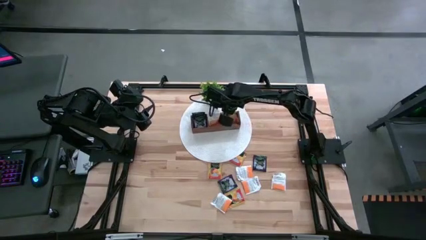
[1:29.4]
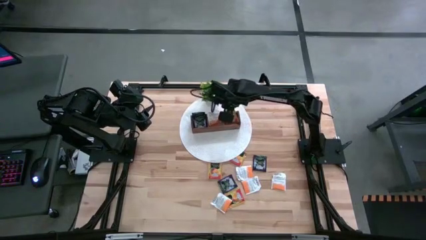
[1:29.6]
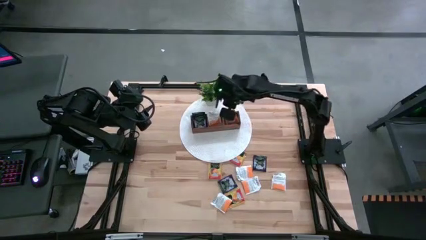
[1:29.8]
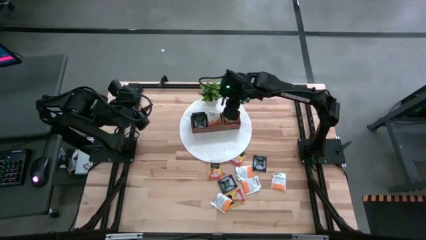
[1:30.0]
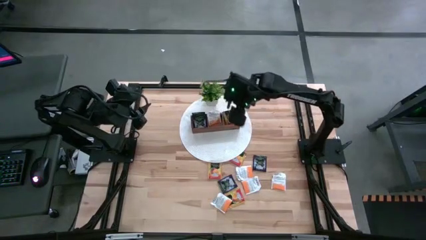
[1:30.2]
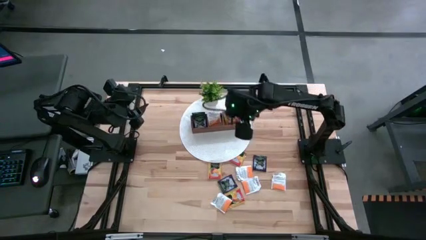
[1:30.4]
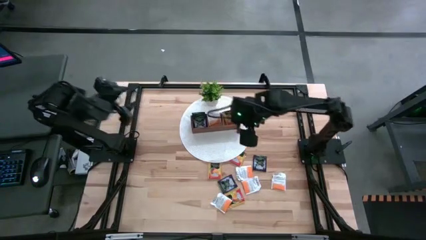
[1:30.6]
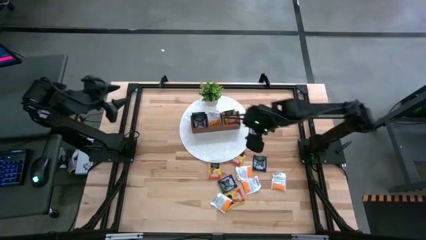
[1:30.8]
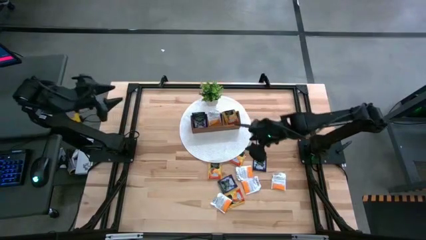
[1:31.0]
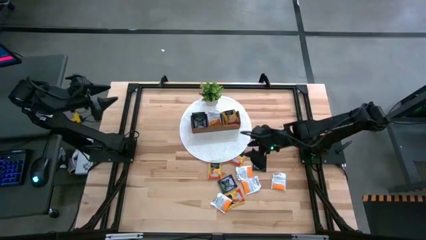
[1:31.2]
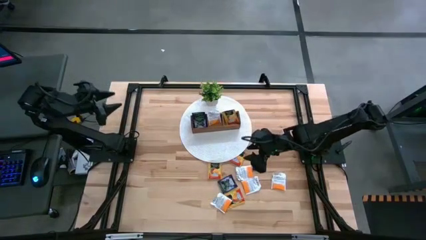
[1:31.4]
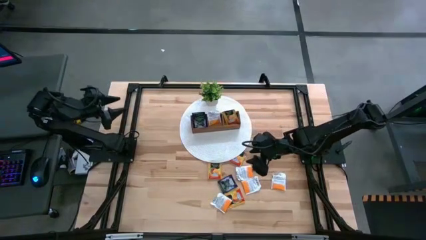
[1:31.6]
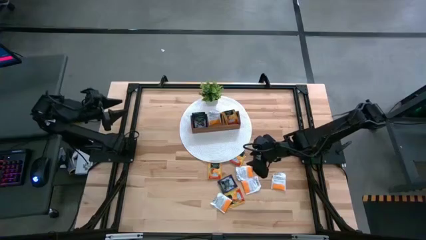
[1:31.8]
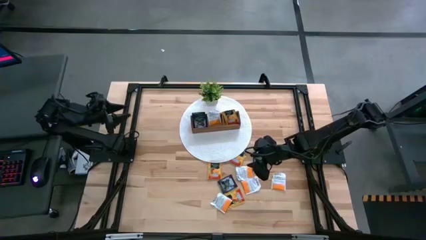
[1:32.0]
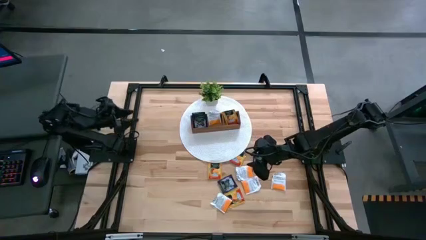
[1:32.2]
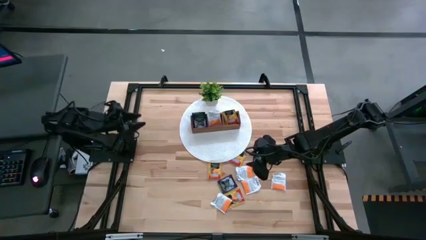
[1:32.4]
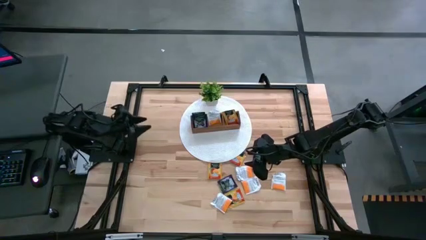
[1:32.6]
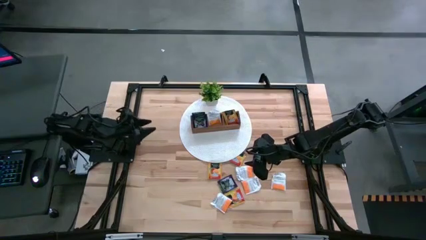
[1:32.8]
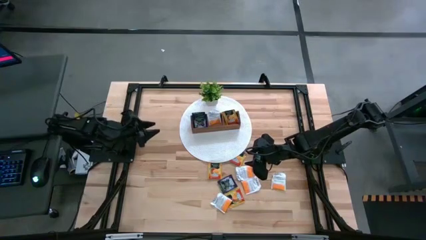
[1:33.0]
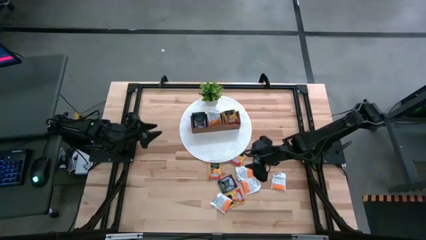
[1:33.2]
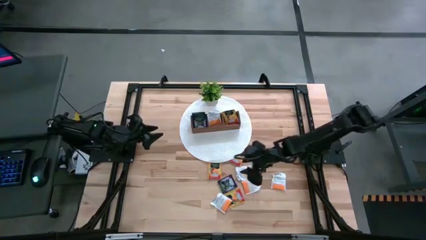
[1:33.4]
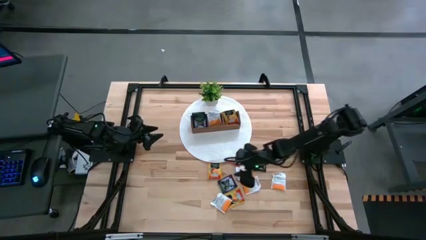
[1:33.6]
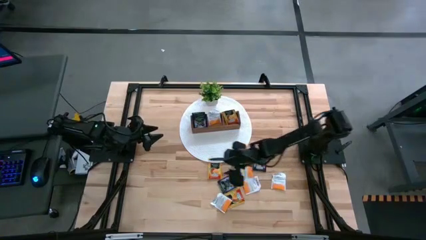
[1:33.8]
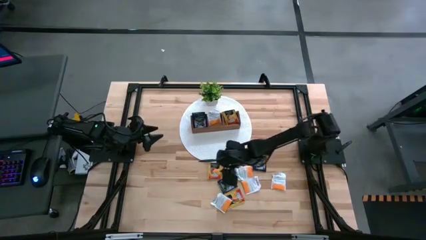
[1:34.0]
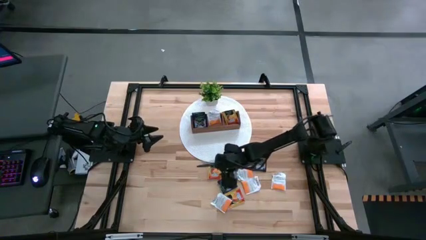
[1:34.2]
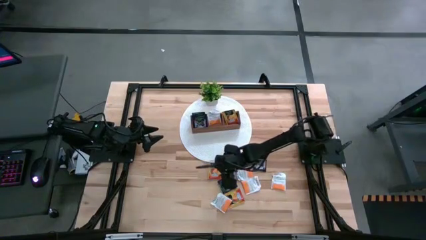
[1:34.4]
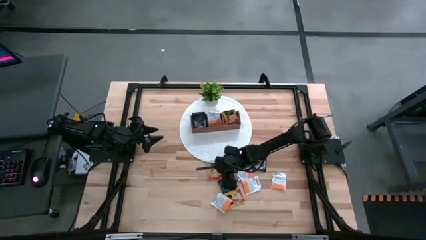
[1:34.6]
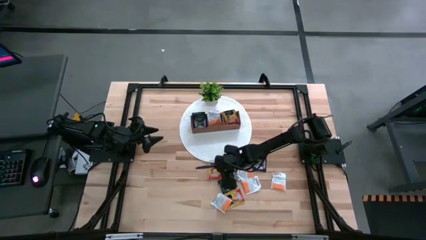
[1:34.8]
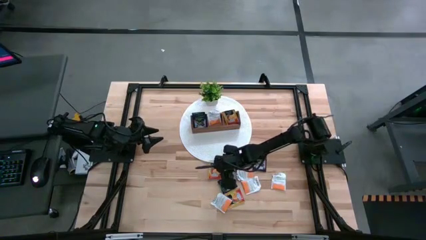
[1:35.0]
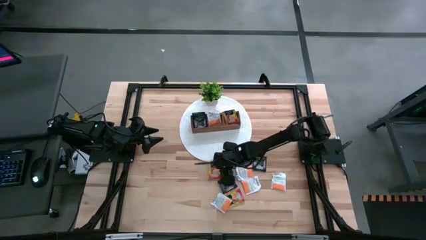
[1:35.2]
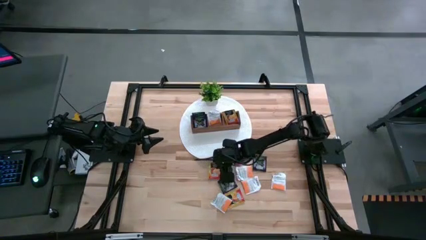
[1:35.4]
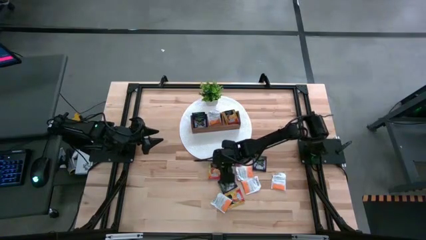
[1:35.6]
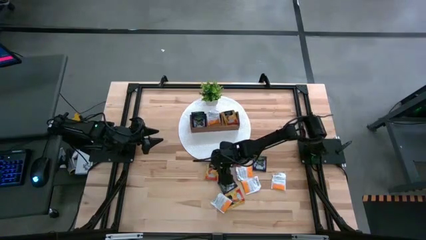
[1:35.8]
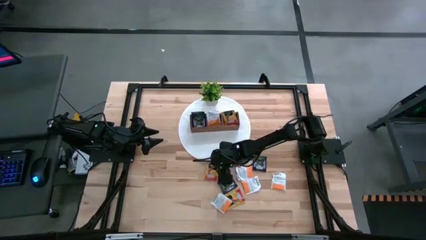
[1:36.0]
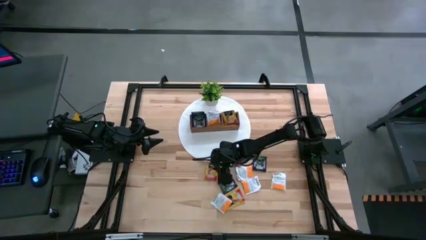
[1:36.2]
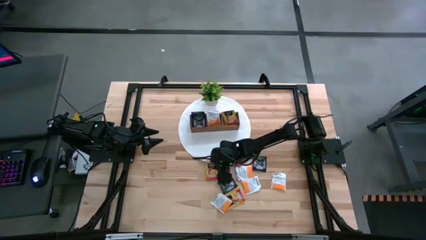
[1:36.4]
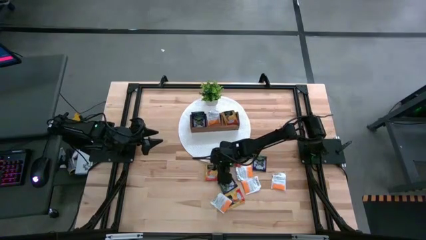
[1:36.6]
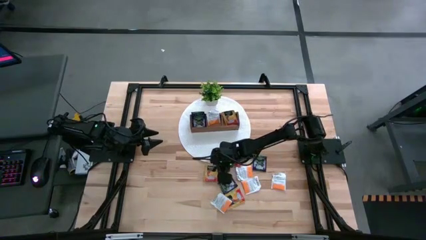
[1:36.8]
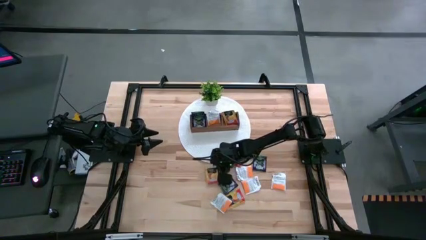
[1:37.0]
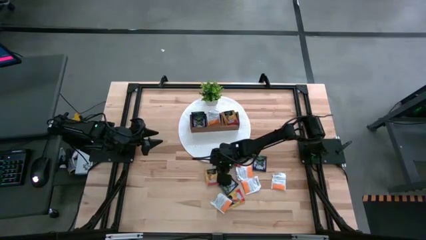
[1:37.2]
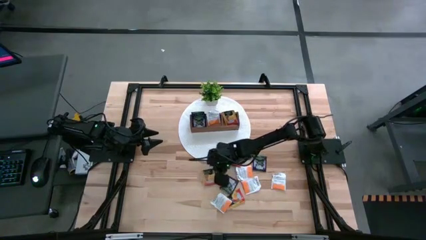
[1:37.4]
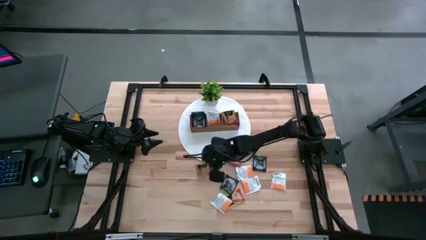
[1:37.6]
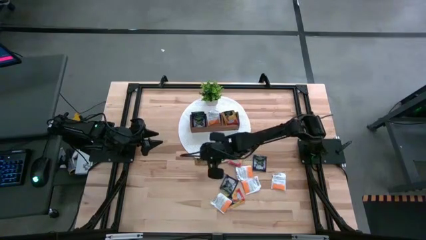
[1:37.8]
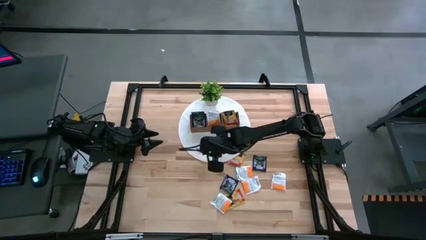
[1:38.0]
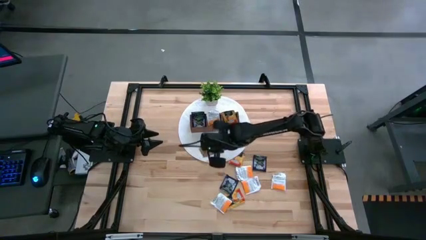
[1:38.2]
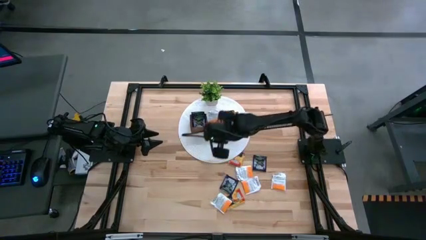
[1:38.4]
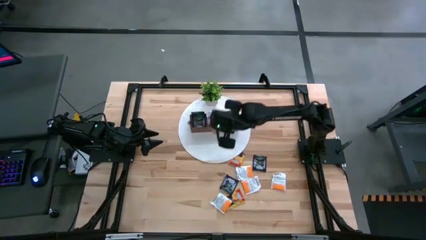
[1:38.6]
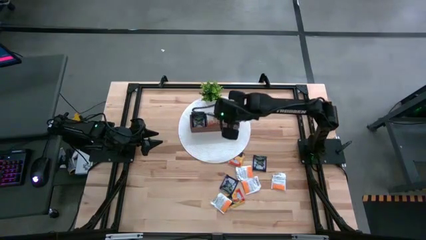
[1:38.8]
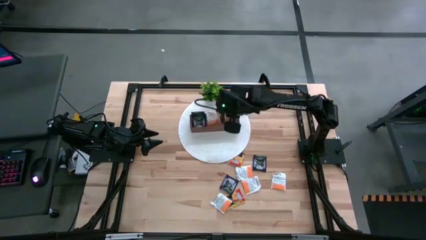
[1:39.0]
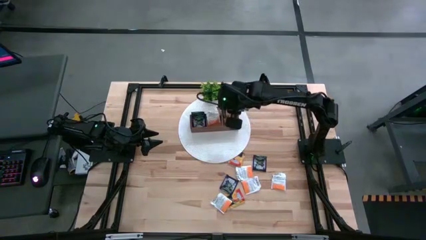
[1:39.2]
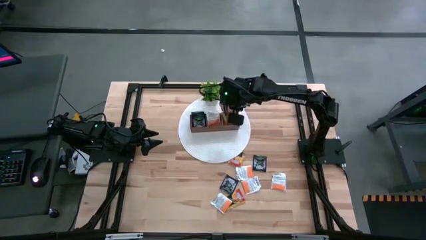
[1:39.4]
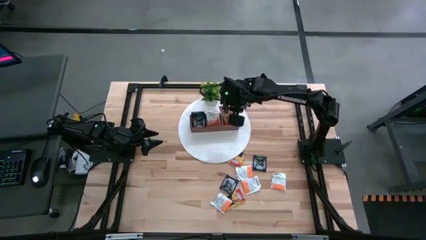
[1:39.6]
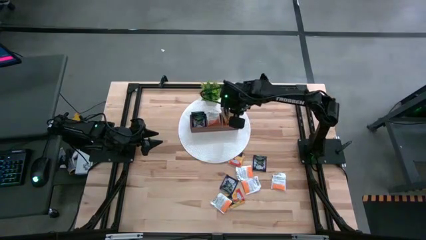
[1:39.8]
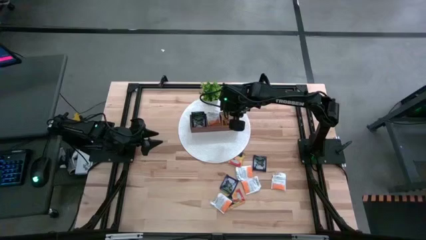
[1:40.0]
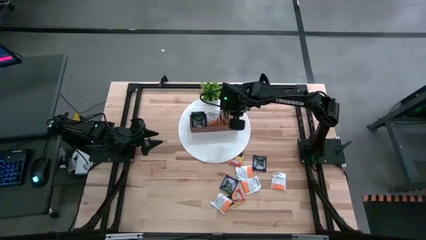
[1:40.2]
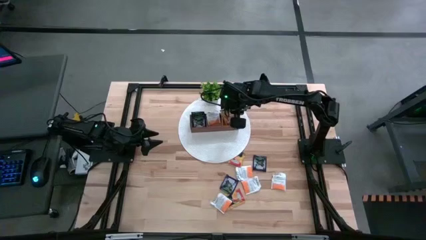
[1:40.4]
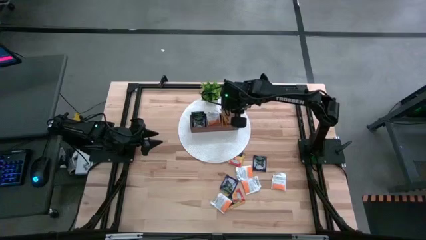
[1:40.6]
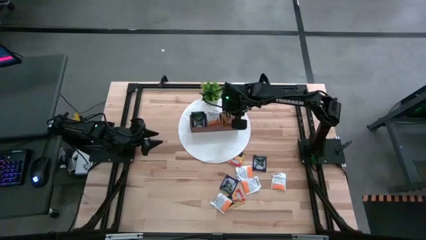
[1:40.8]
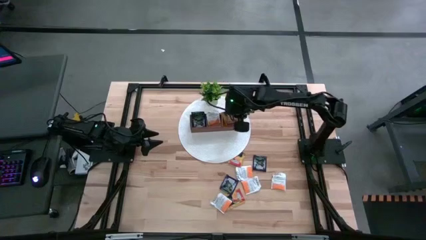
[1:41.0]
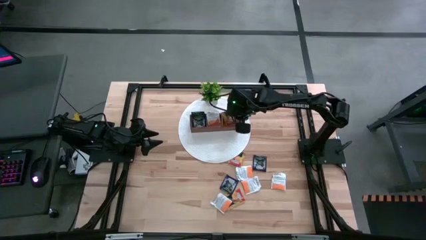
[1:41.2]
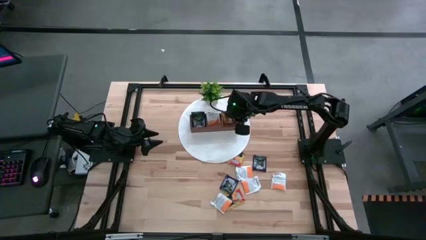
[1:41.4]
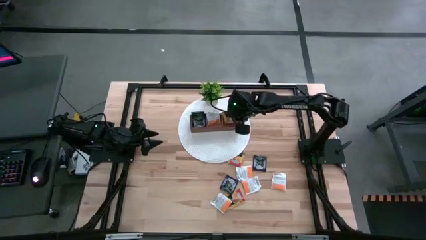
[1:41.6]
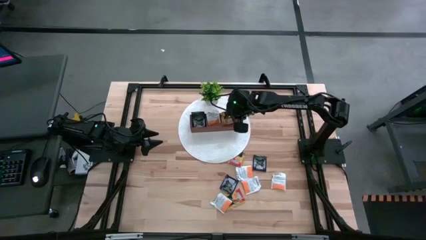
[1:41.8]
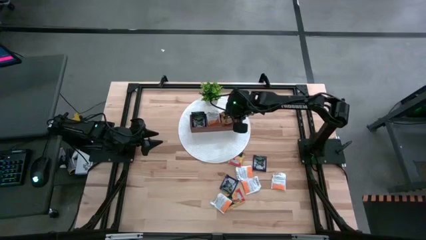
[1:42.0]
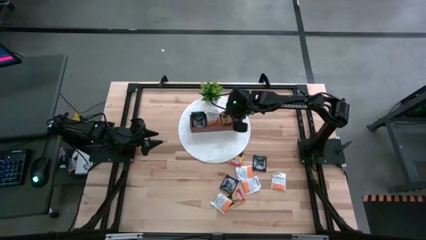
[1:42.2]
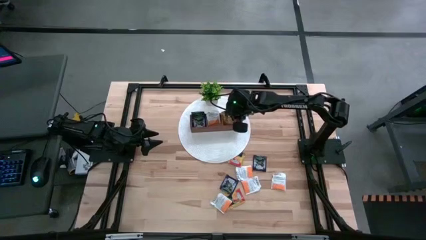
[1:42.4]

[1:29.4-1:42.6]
Task: Pick & Place Tea
Put the orange tea bag into the right section of the wooden organizer

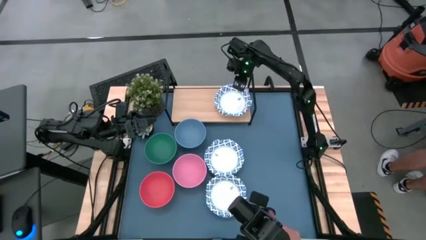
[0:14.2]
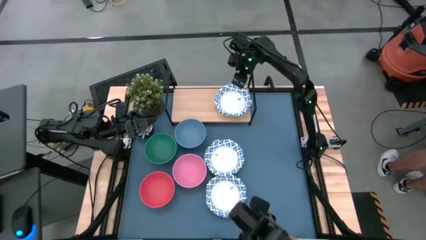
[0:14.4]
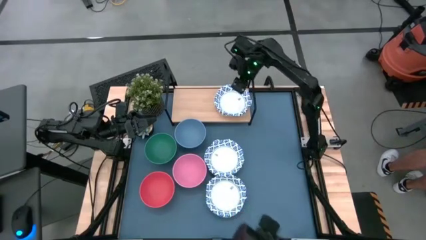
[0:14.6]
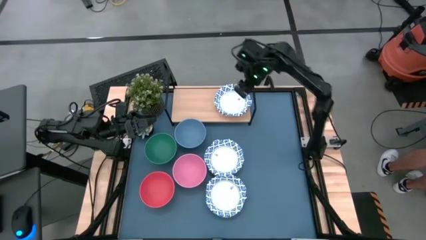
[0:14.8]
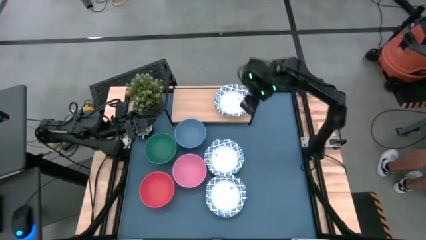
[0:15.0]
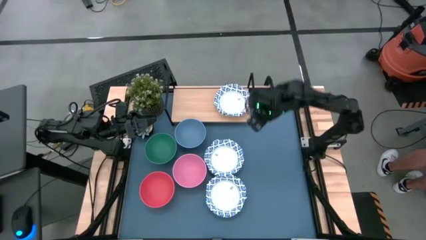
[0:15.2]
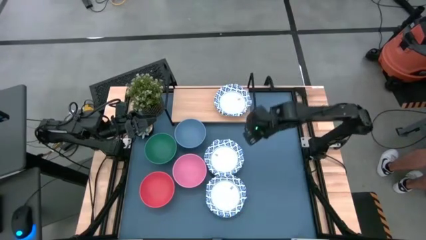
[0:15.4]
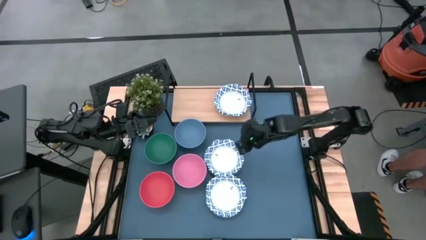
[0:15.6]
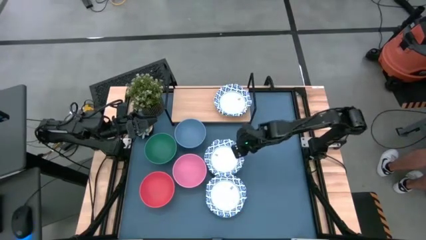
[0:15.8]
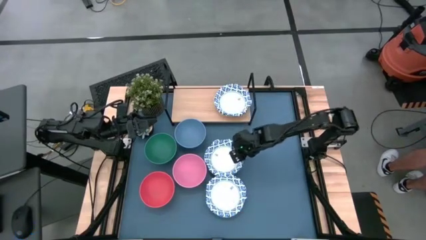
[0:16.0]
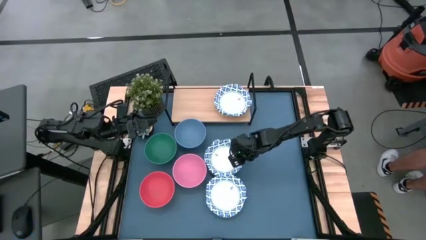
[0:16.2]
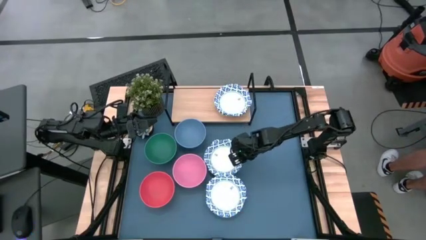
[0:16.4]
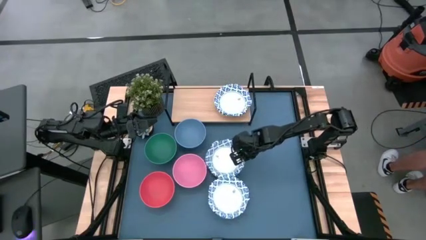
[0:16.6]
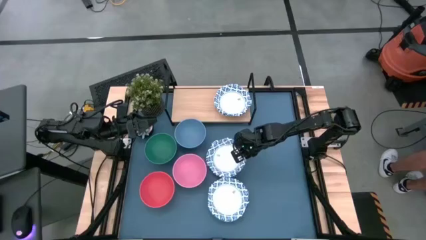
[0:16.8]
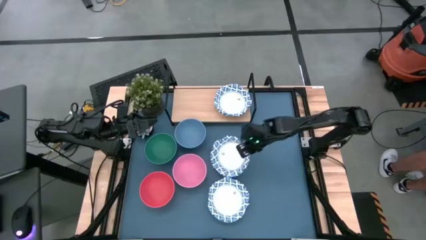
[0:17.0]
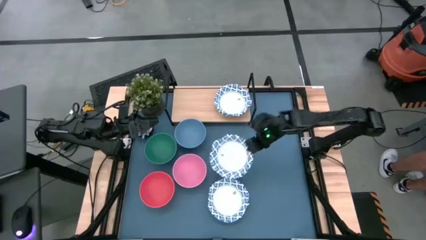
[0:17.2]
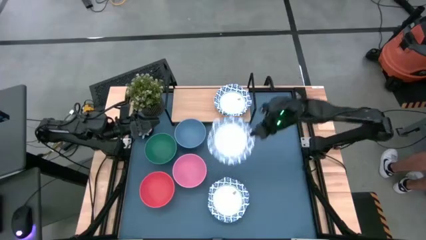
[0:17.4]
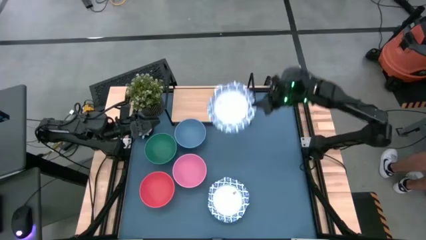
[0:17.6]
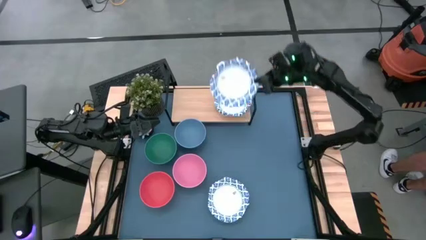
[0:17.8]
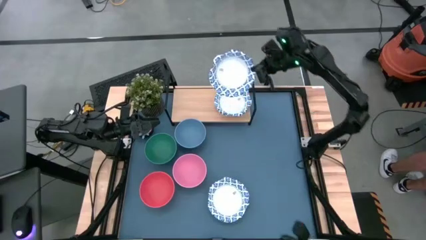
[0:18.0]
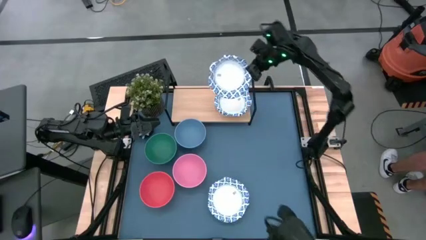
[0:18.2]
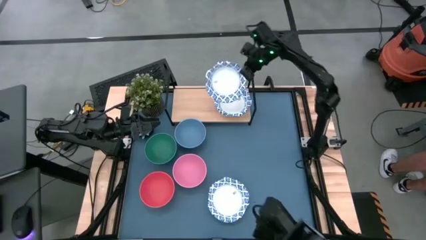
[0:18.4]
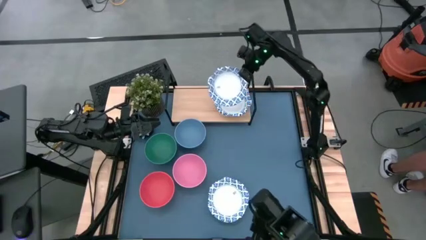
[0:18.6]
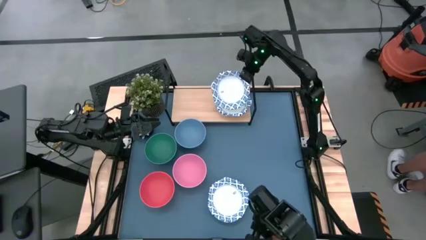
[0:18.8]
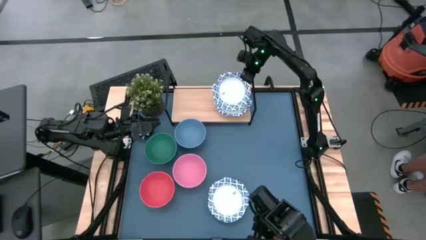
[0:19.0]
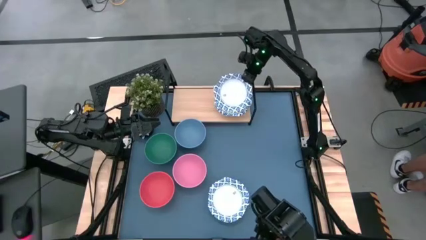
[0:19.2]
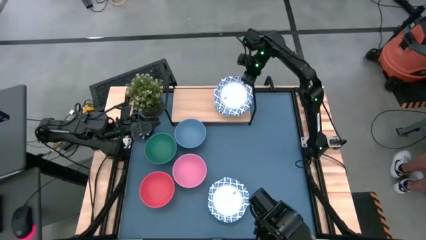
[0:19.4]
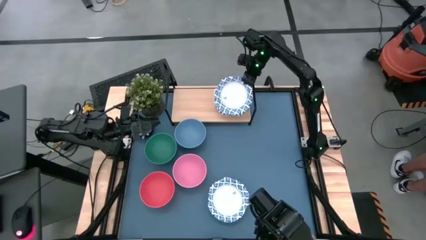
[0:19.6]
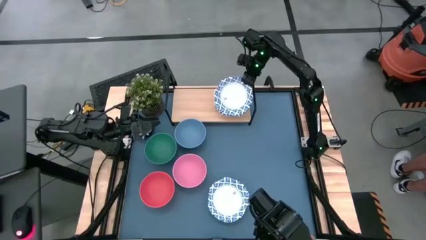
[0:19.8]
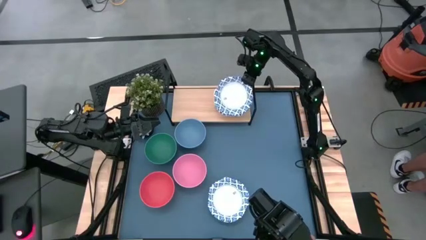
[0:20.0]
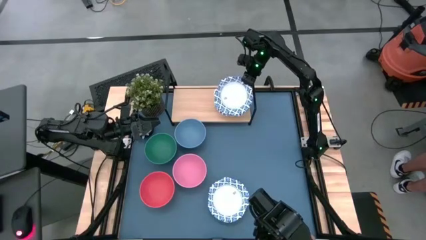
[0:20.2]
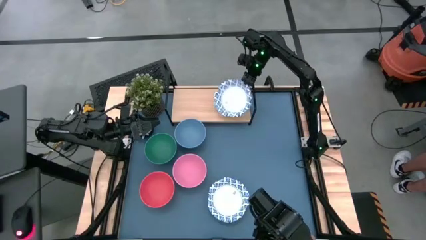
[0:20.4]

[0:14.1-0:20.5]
Task: Place and stack bowls onto a shelf
Stack the white bowl on top of the white bowl on the shelf
